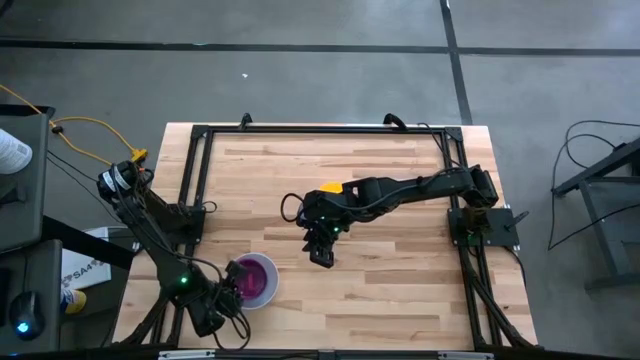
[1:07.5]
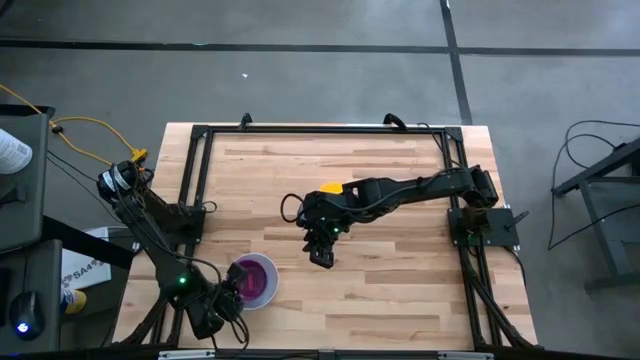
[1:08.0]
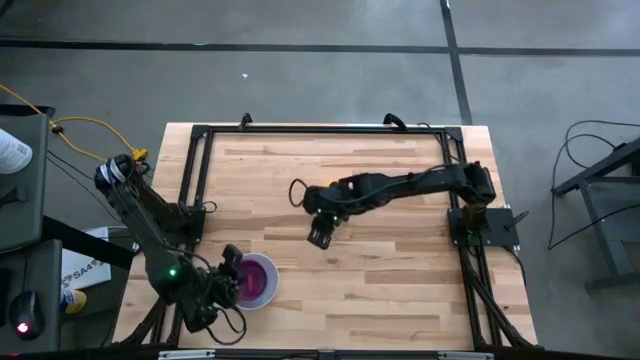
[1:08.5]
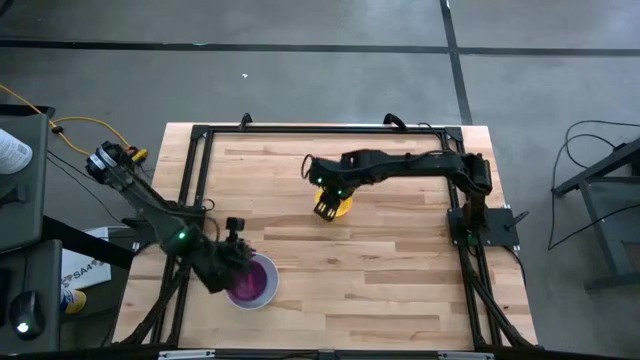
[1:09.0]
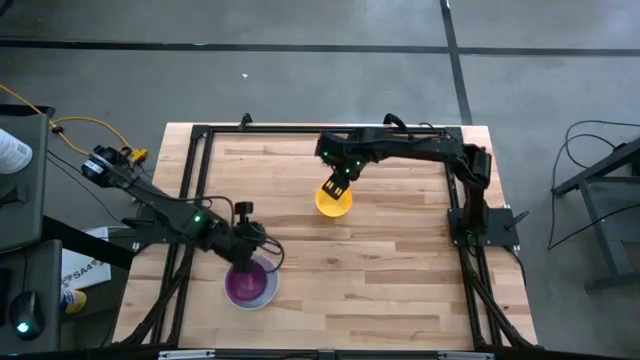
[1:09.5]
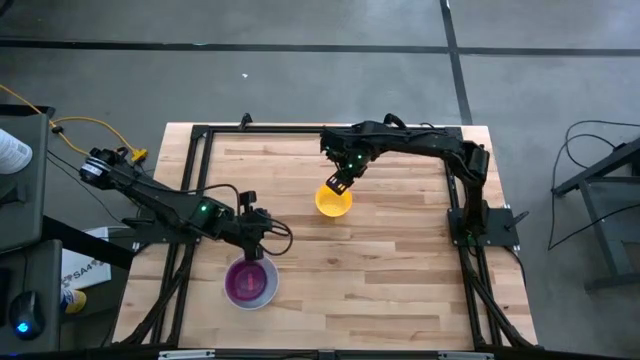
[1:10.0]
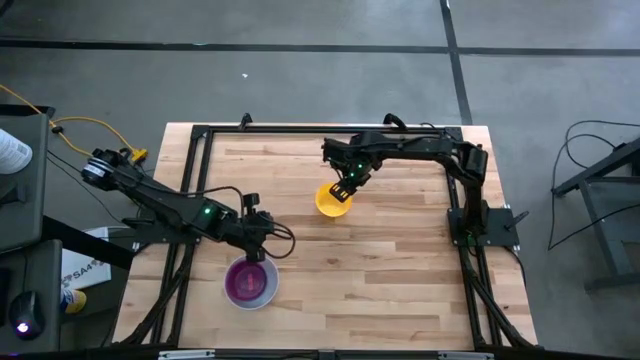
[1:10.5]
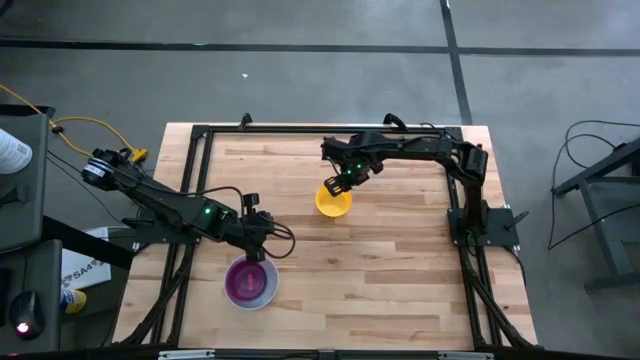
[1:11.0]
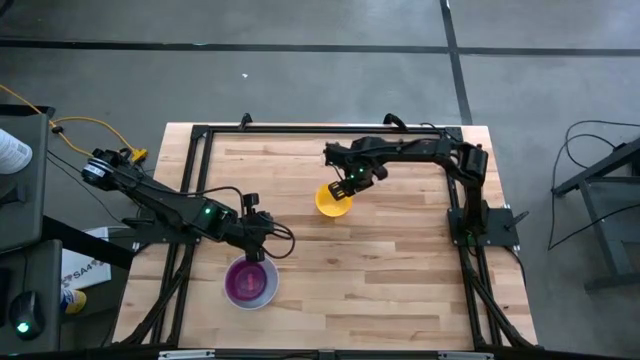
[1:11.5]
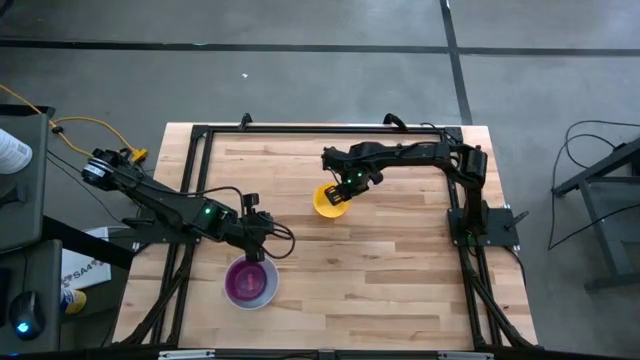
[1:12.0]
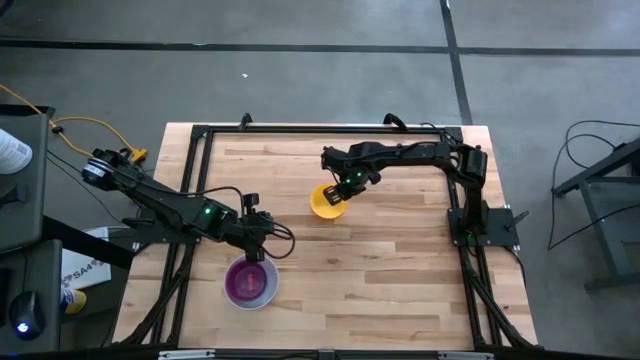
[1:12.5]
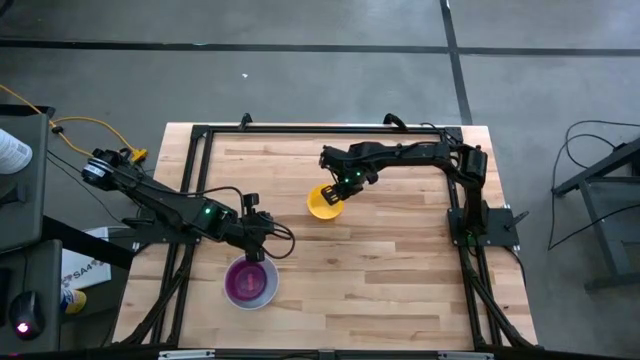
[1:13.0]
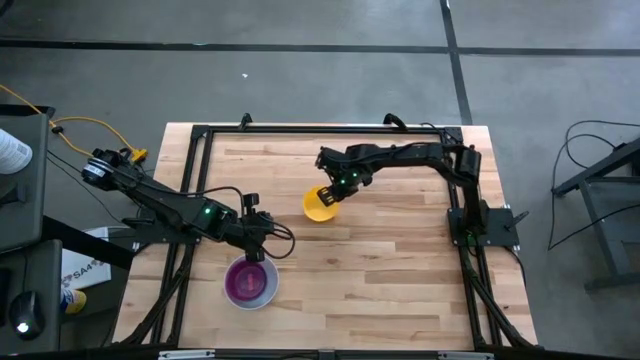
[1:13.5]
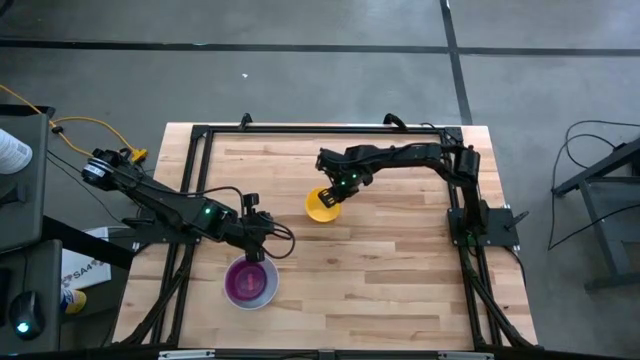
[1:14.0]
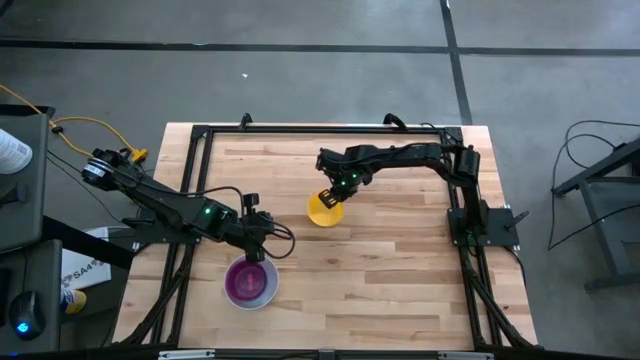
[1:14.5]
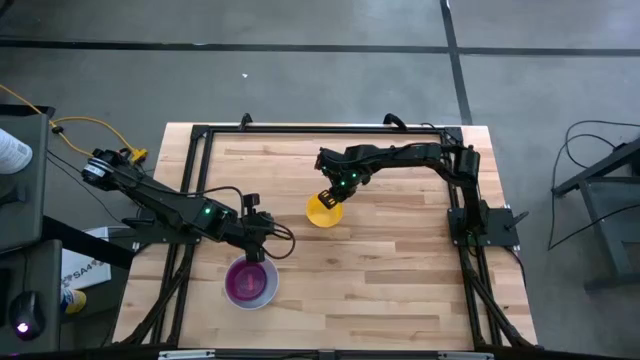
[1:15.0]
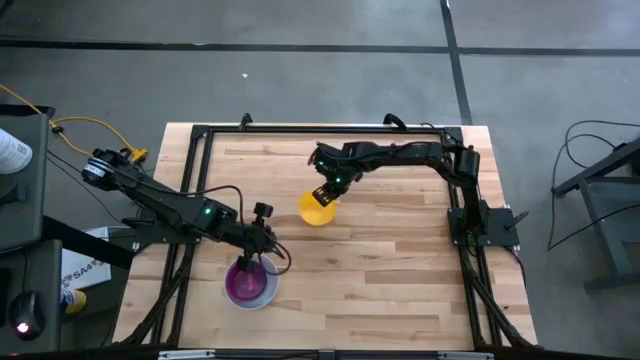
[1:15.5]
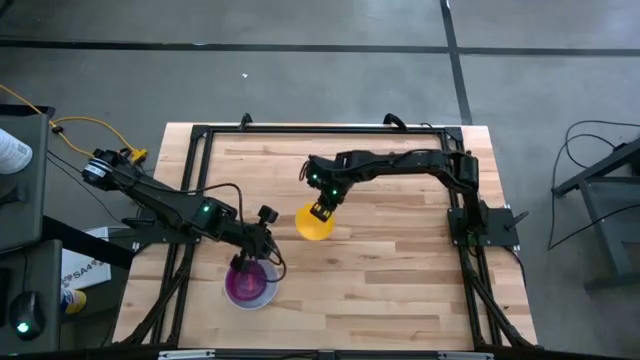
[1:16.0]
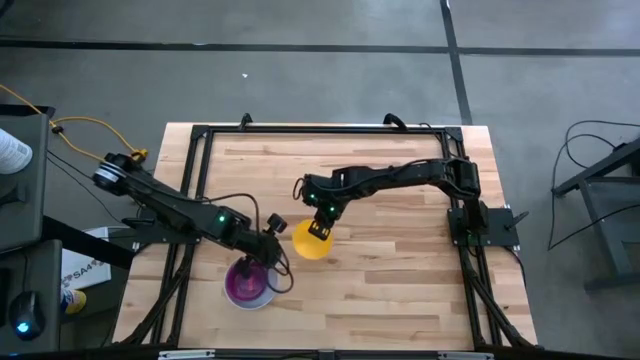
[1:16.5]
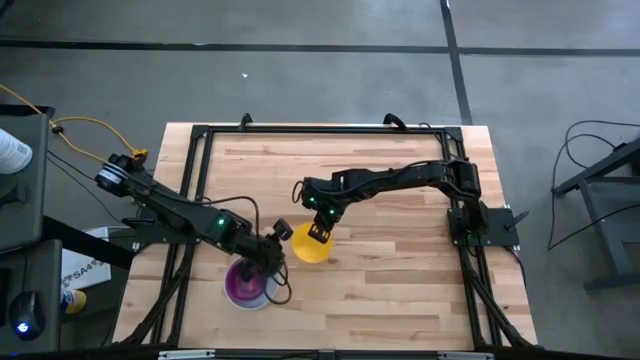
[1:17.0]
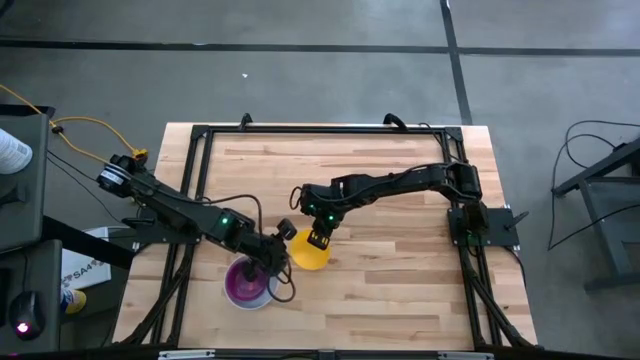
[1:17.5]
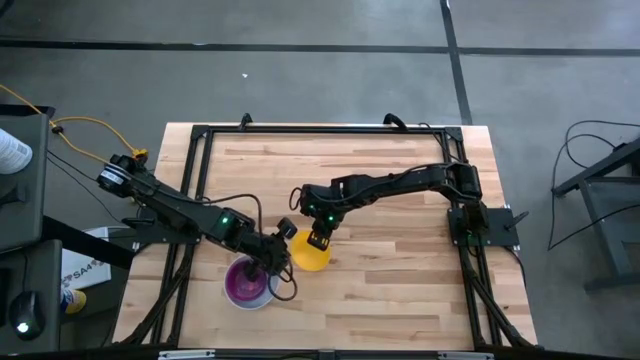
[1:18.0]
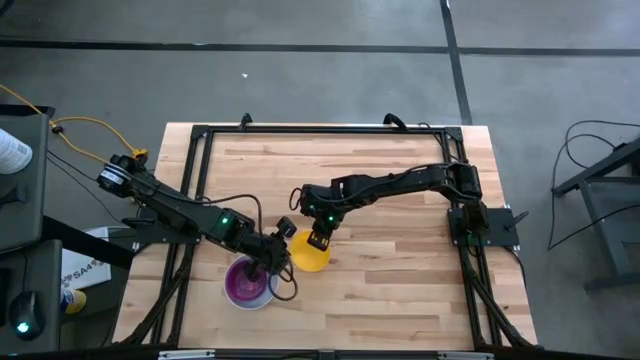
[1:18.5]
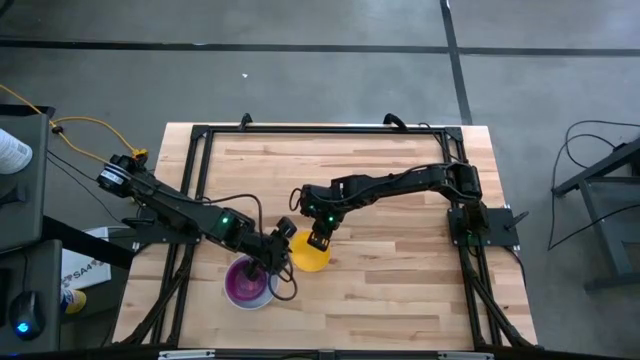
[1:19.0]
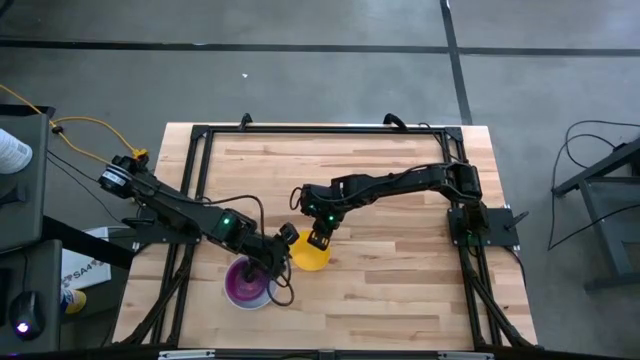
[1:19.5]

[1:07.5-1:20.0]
Stack the yellow bowl on the red bowl
